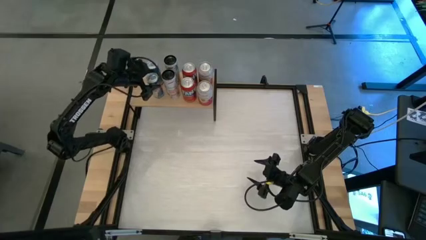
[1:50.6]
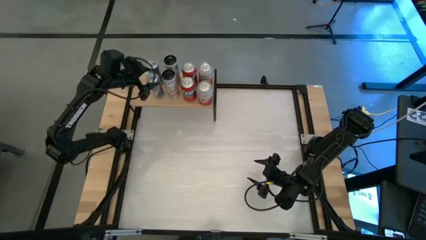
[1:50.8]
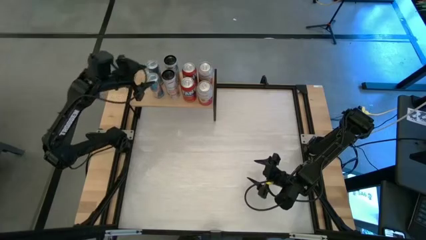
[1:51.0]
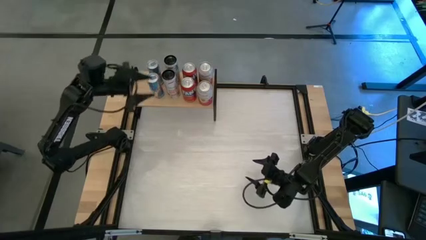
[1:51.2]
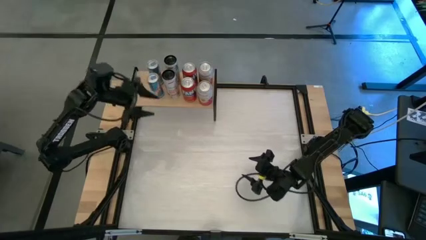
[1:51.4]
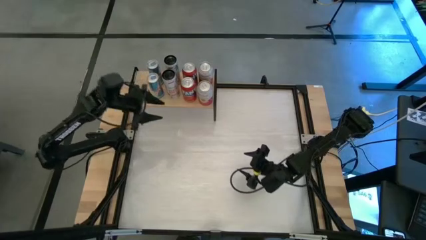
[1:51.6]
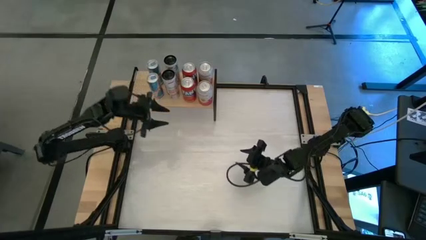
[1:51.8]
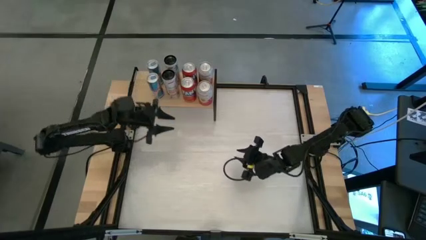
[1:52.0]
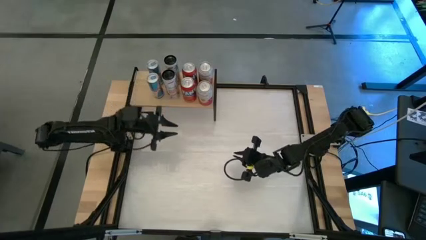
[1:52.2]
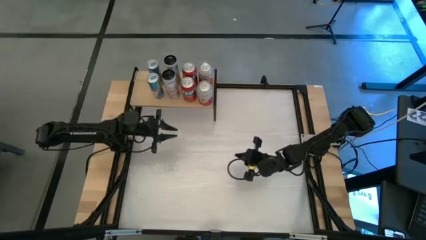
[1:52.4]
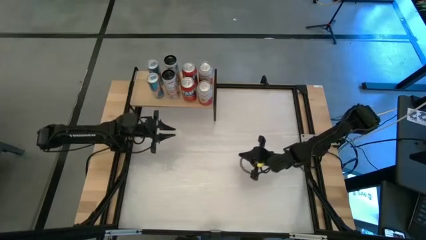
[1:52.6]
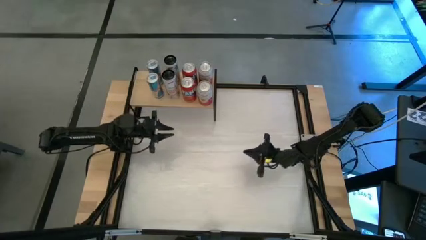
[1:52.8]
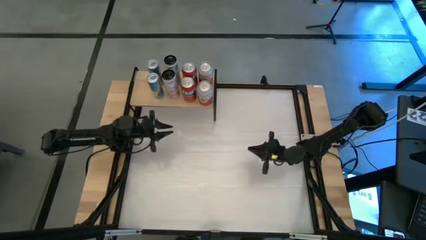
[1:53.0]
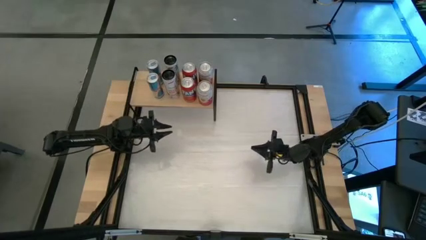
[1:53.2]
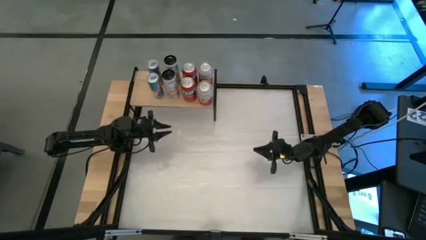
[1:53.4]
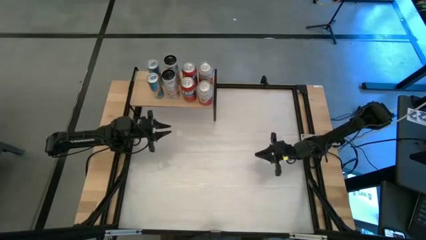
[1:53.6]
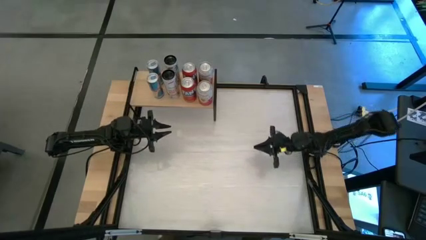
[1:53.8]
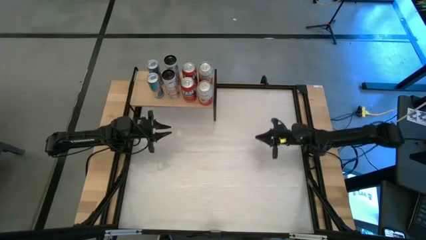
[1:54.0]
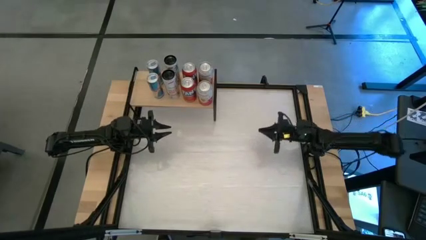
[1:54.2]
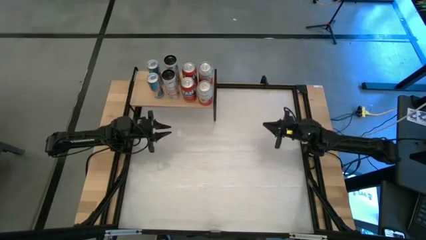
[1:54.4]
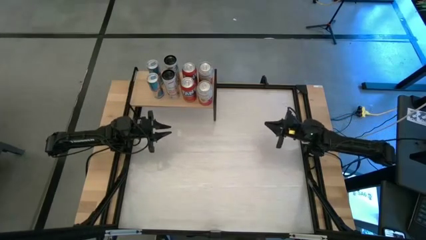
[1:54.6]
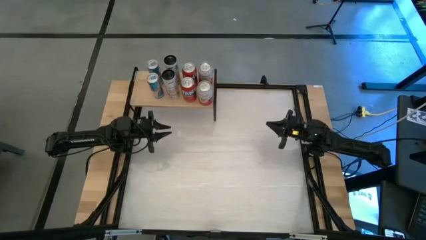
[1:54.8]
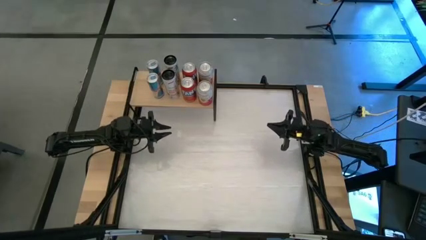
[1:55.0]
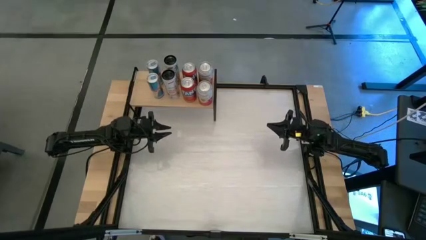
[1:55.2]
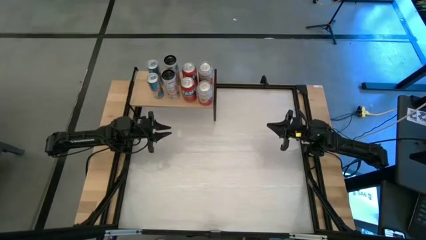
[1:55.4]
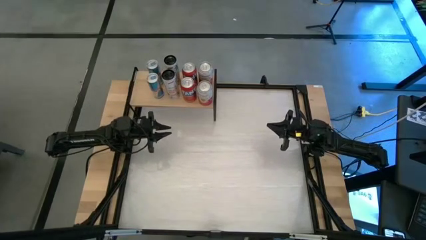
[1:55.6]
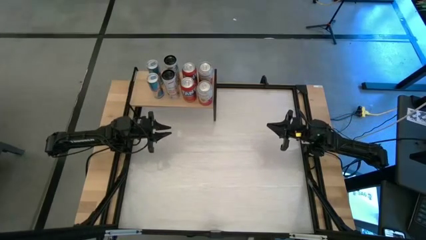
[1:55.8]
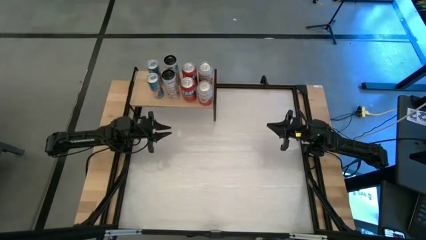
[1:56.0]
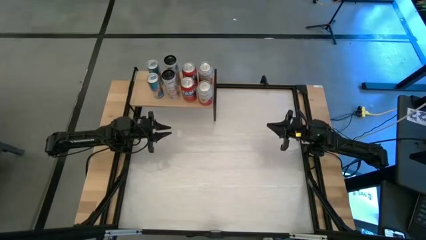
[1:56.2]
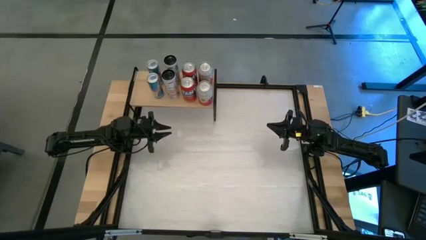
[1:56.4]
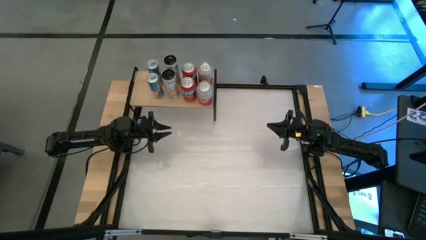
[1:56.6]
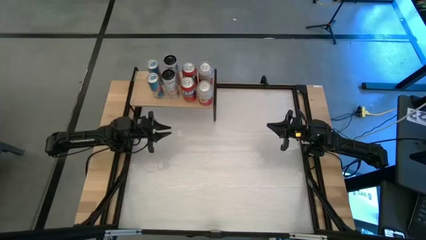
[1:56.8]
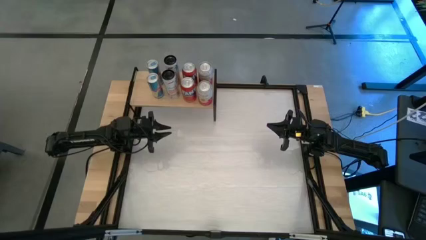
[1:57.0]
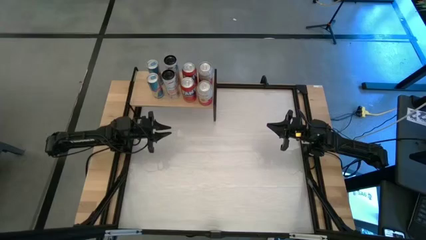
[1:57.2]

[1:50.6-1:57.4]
Task: Place canned beverage on shelf
Return to Home Position

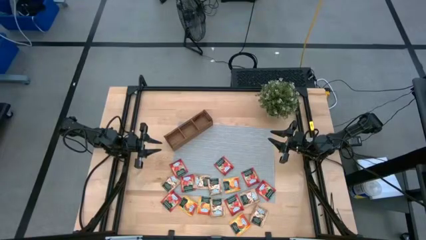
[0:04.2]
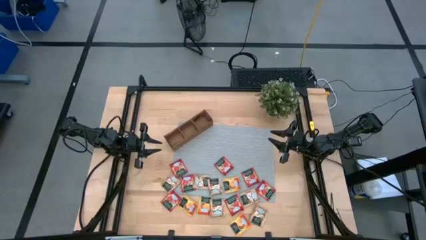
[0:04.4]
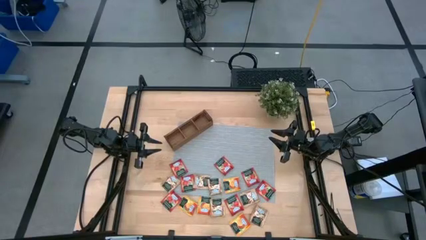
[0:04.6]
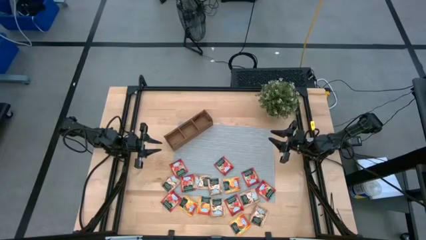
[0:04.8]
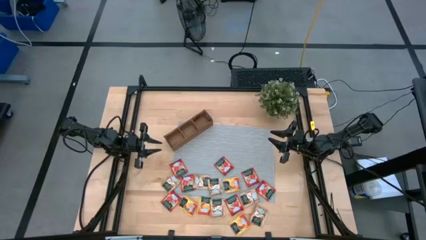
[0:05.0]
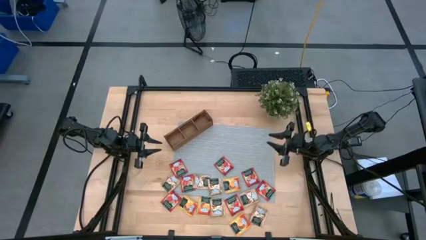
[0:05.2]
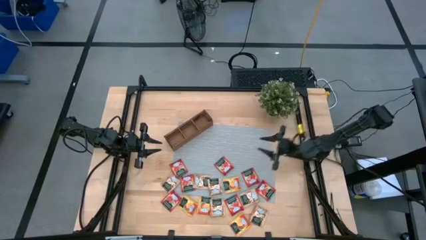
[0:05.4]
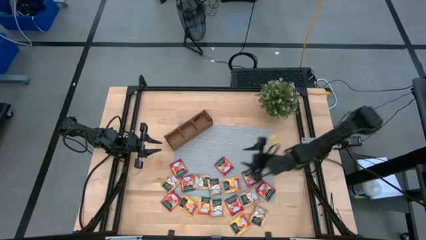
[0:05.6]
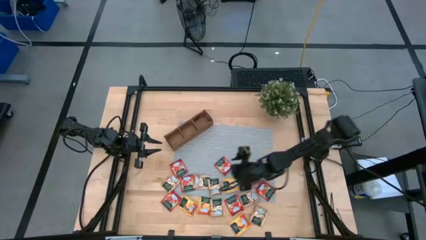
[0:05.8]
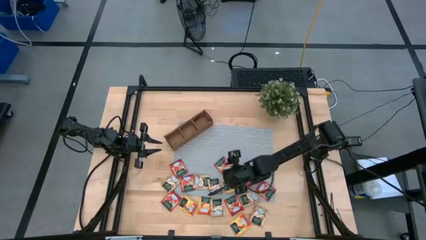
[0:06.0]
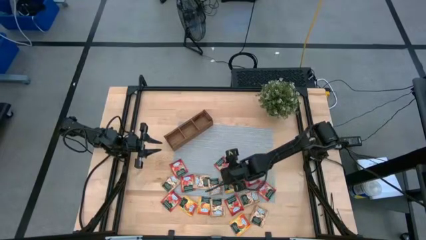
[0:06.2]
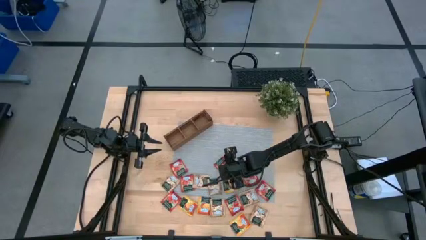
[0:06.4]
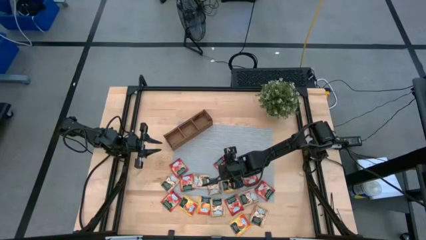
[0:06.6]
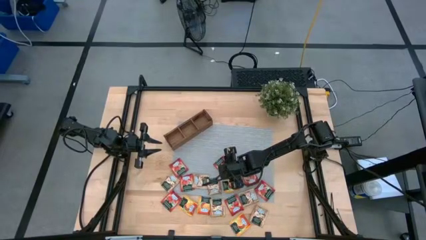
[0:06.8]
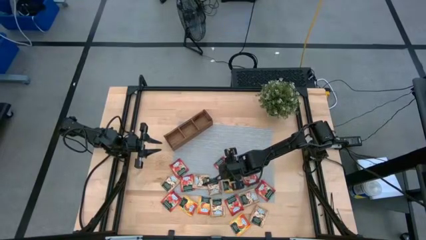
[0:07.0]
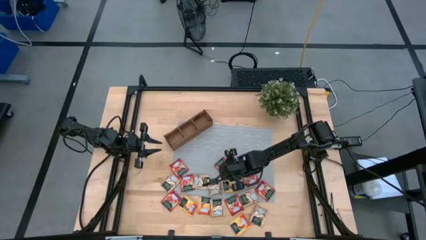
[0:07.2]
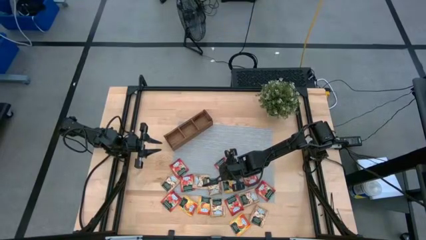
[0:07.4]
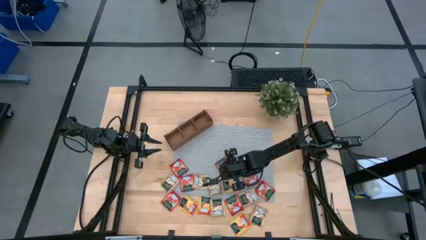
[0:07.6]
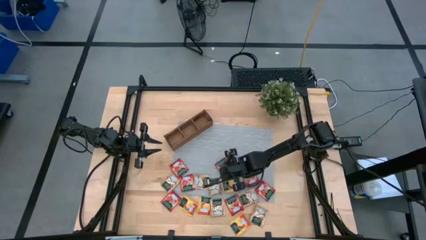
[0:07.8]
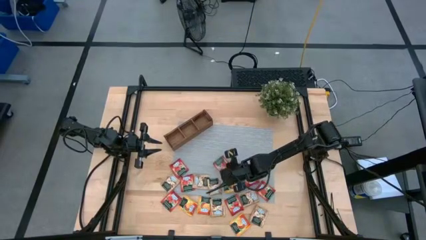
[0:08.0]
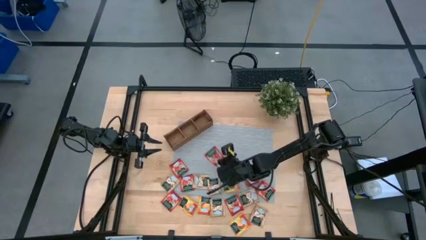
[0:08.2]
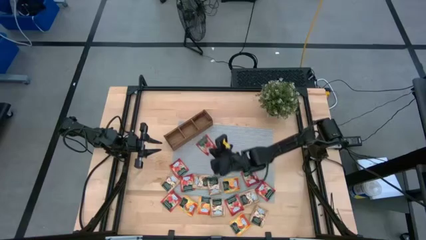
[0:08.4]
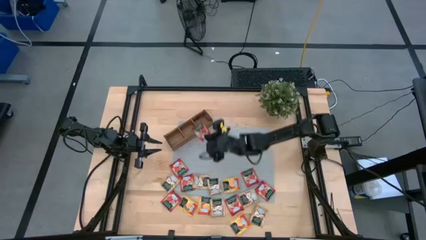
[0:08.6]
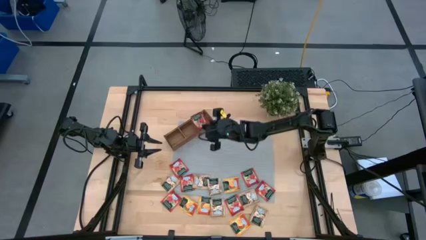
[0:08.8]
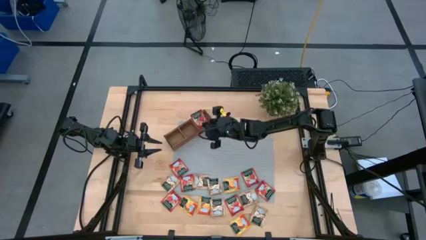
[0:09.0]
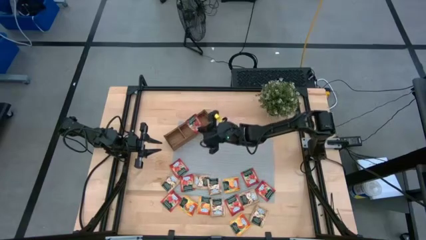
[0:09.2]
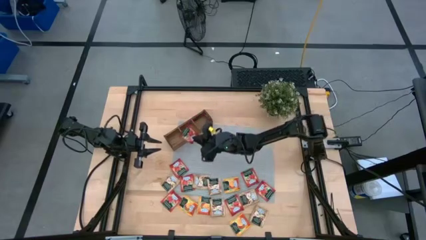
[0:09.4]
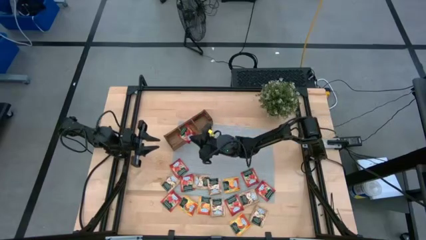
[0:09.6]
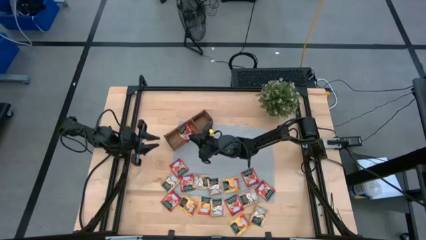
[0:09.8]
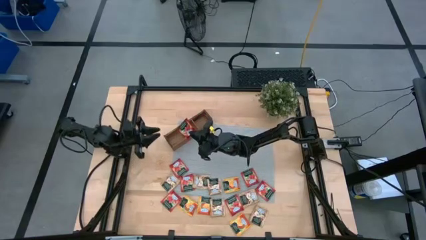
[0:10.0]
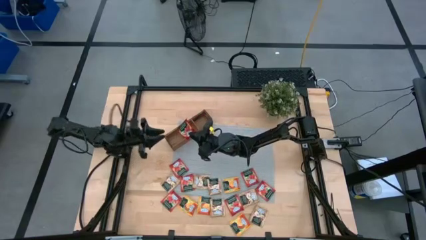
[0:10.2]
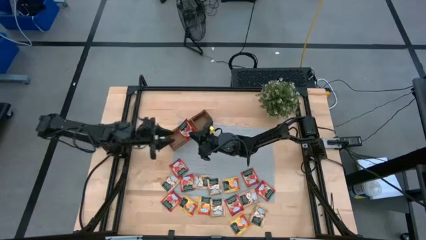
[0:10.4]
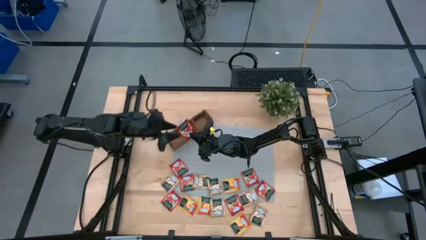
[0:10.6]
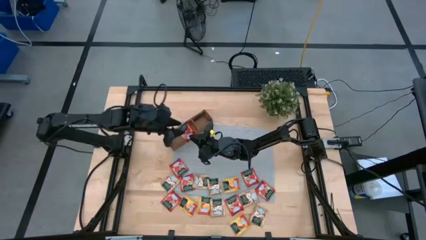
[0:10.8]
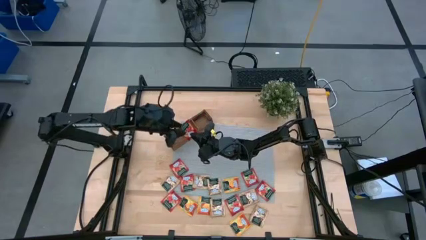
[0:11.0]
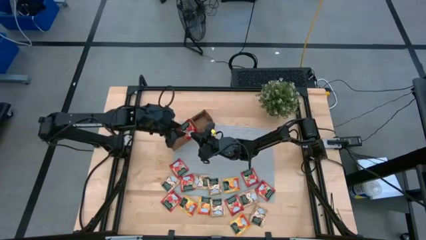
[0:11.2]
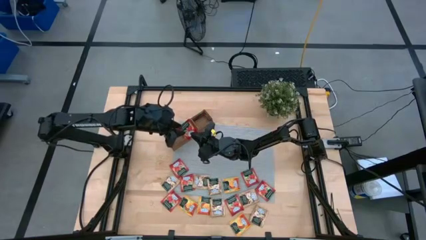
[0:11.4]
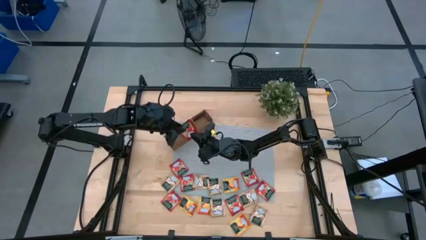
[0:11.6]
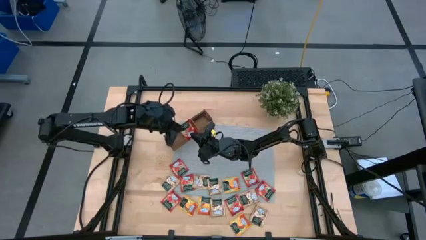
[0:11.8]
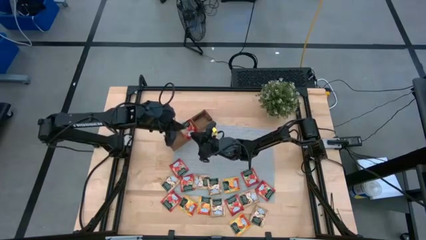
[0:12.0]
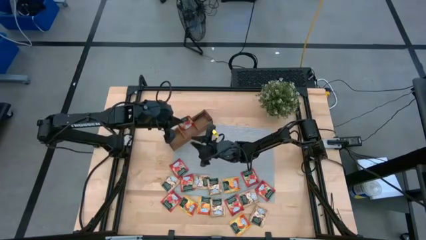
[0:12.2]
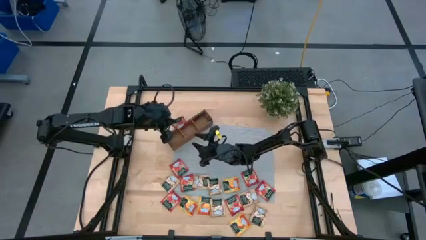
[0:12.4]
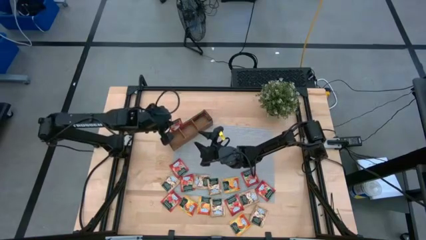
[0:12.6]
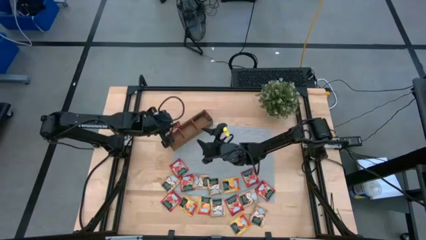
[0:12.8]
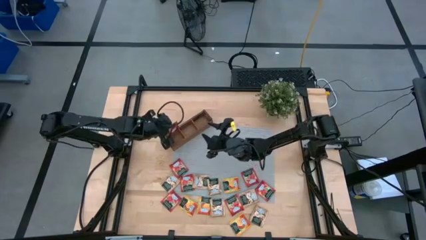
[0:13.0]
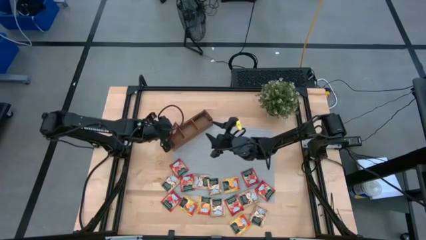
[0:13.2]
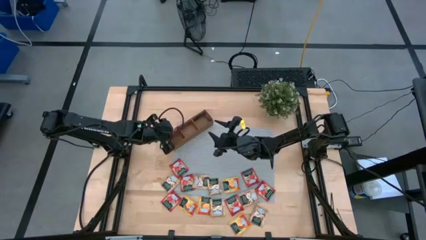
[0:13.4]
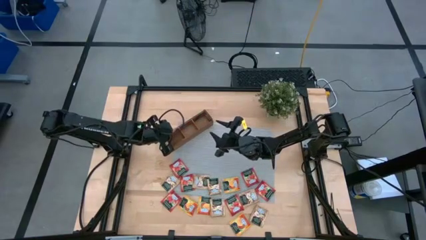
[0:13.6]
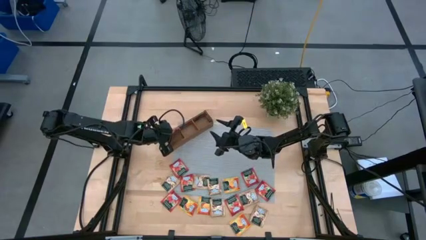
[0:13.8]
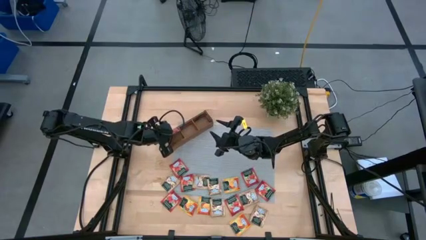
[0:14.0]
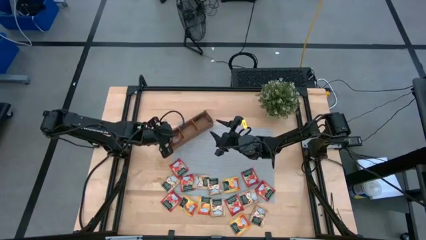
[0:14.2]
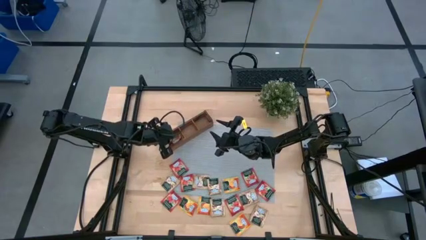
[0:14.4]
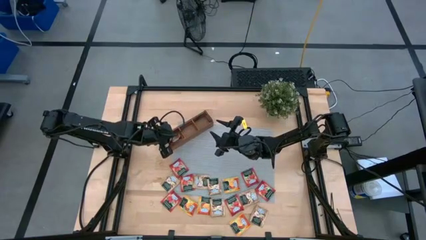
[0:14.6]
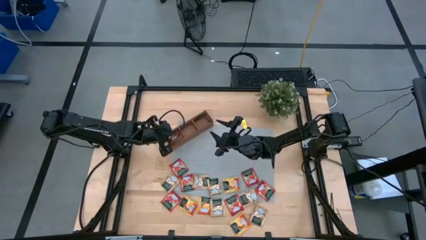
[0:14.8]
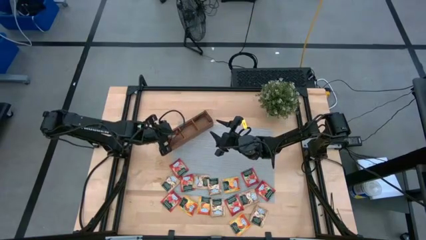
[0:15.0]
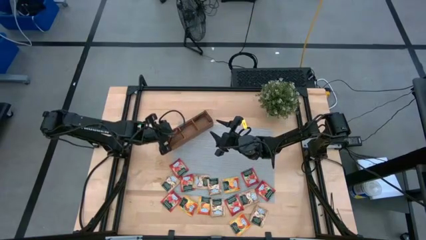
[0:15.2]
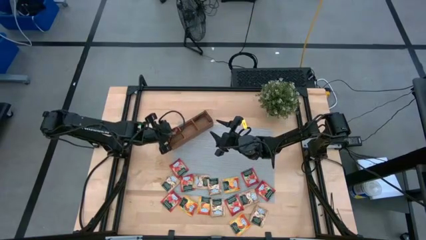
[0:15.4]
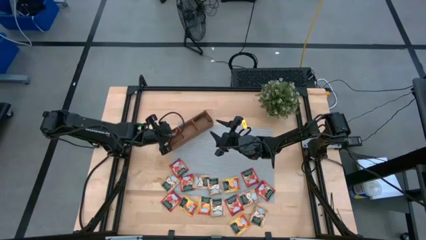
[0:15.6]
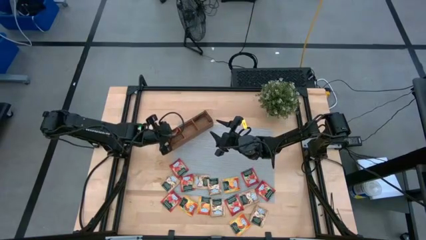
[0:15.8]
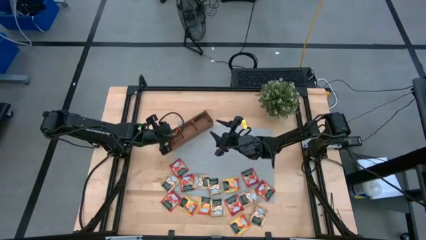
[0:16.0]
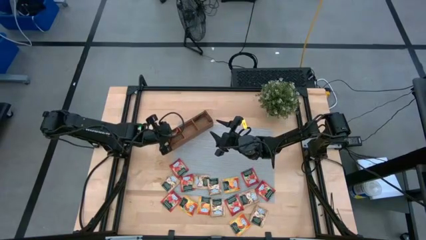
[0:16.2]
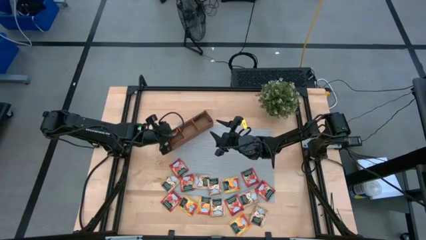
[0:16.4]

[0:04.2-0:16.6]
Task: Pick & Place Tea
Put the red tea bag into the left section of the wooden organizer
